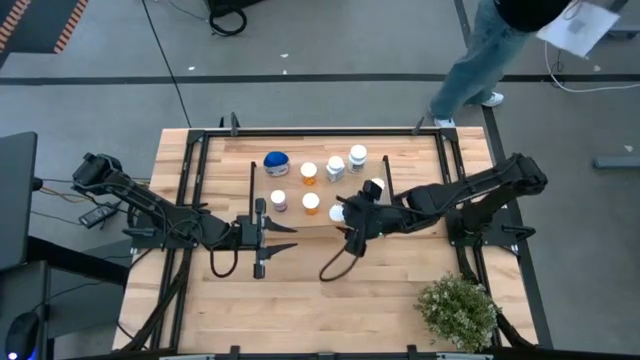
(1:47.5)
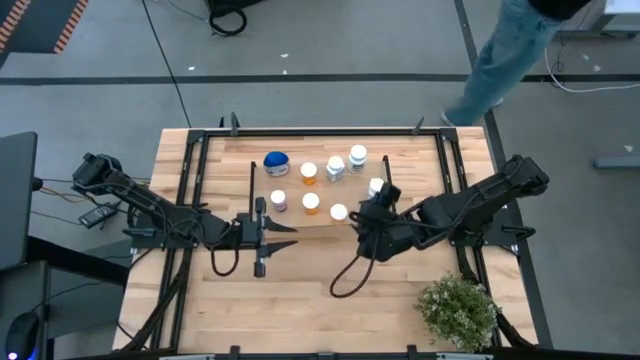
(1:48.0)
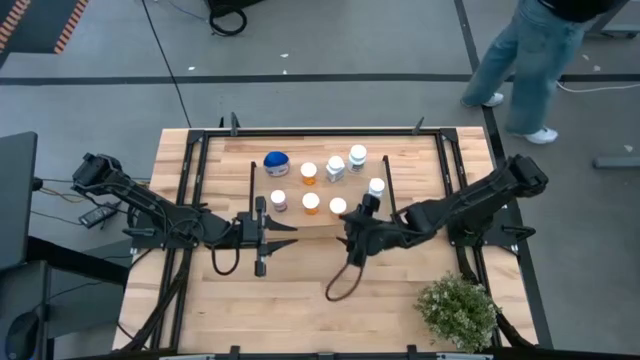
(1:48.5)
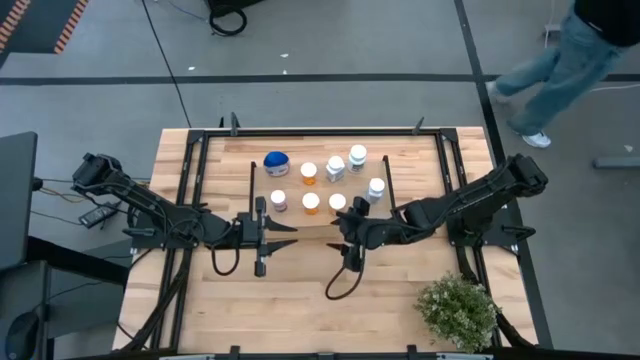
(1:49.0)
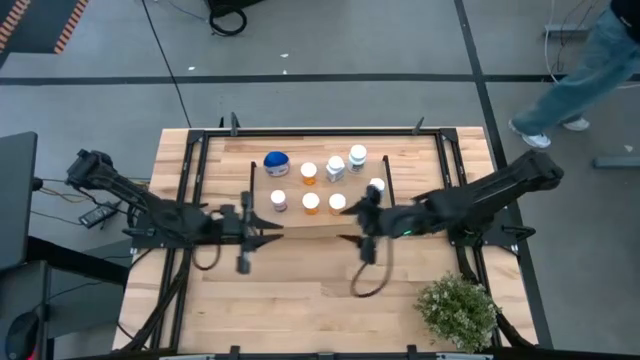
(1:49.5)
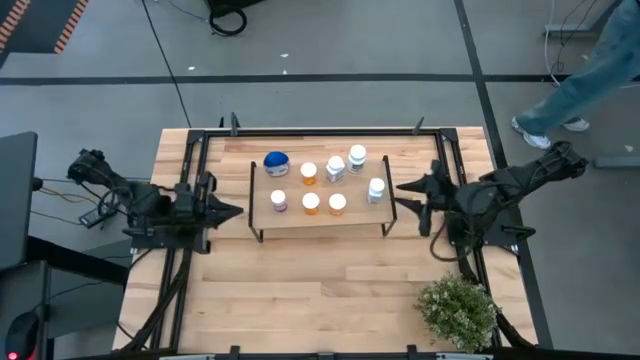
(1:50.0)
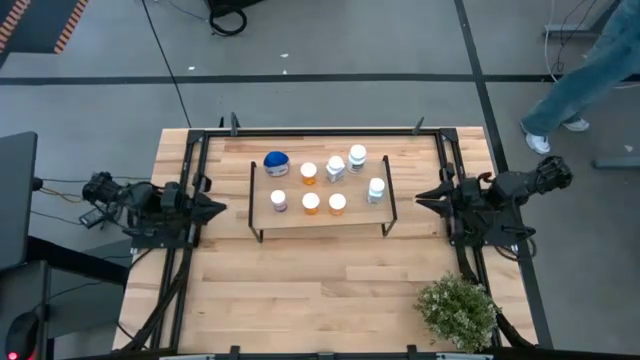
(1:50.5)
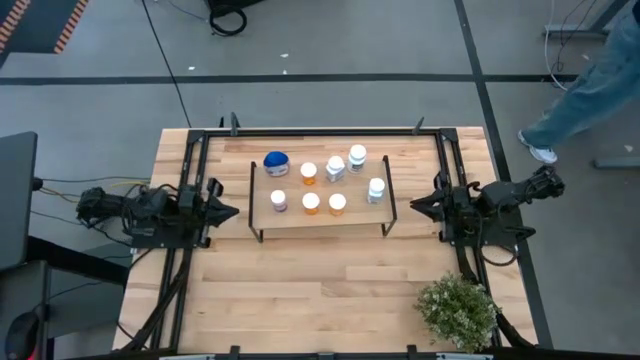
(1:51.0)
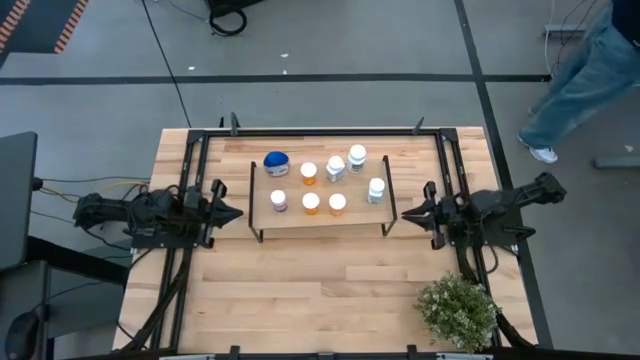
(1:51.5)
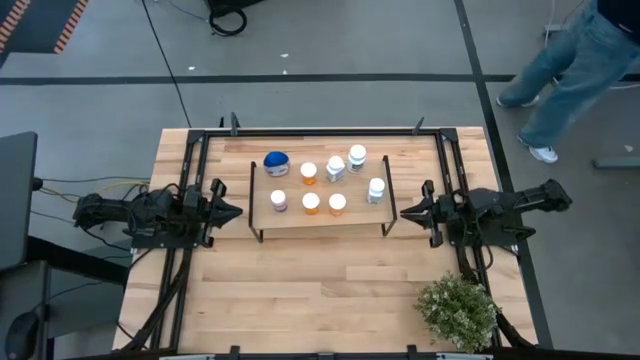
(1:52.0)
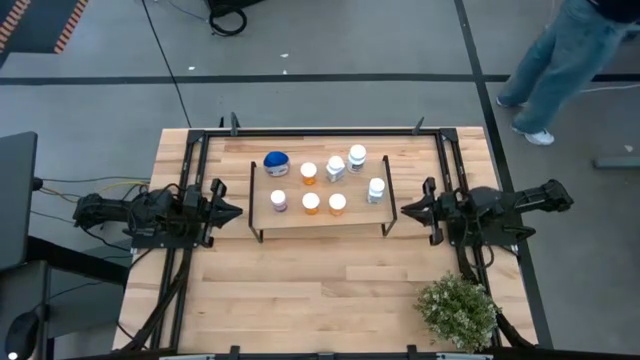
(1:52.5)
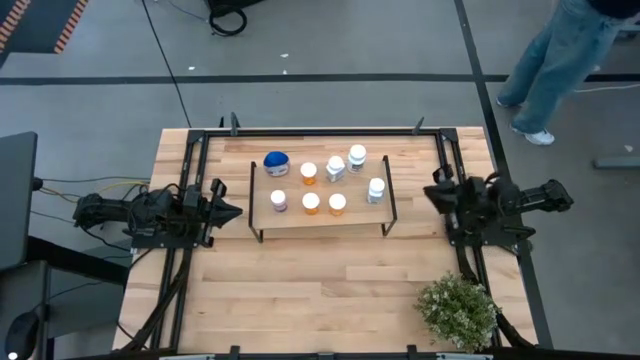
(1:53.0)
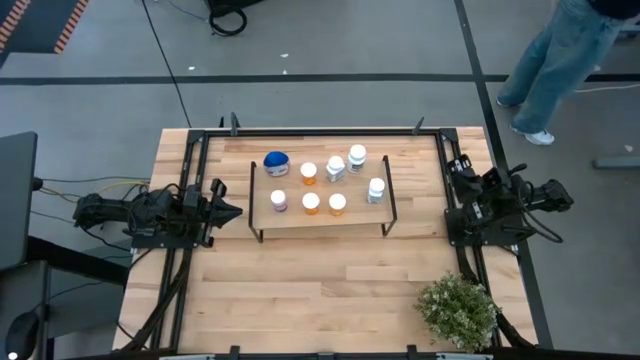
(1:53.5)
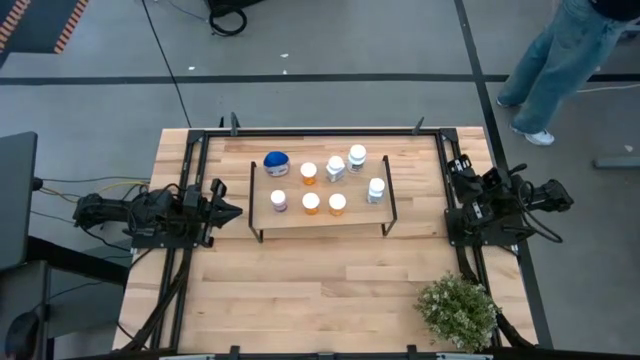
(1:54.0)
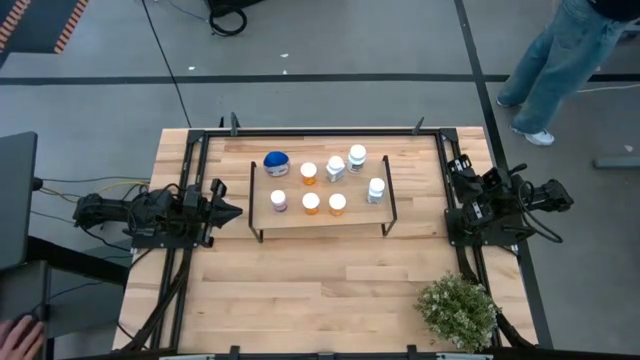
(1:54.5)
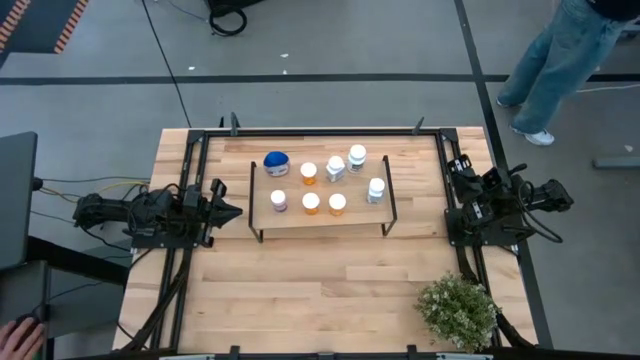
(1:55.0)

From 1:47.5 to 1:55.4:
Task: Pick and place medicine bottles onto shelf by color
Return to Home Position

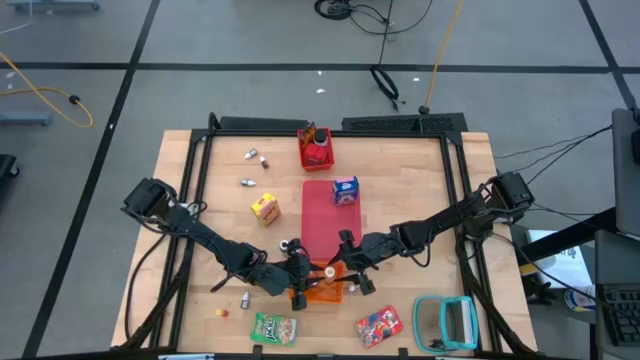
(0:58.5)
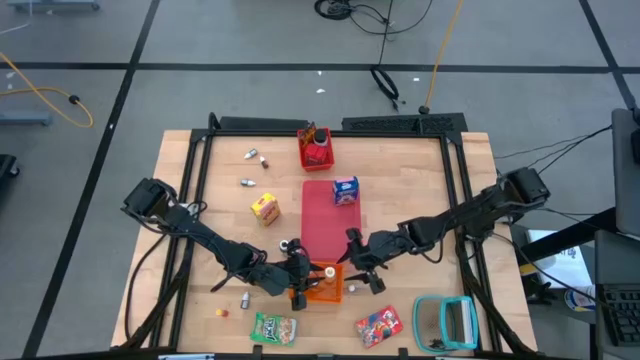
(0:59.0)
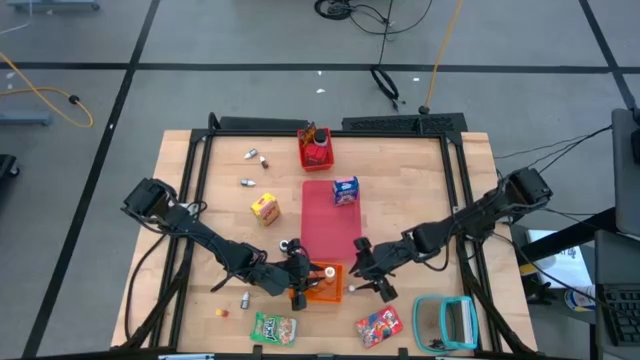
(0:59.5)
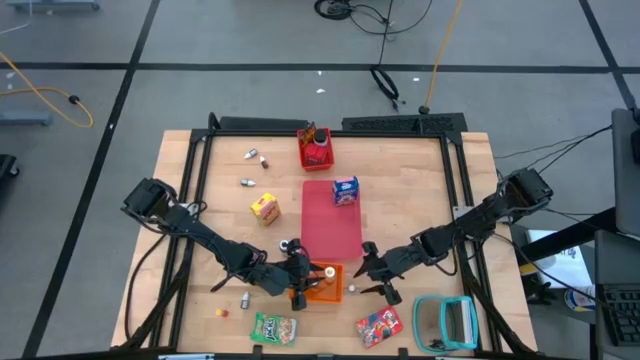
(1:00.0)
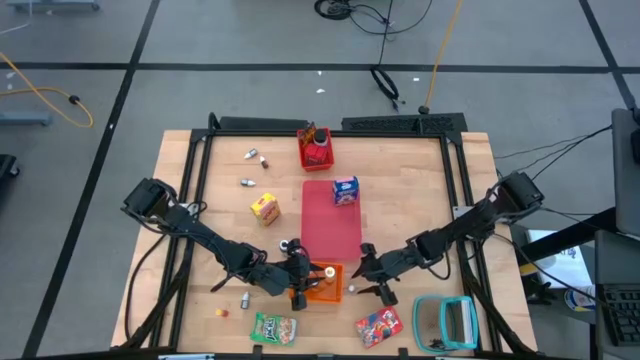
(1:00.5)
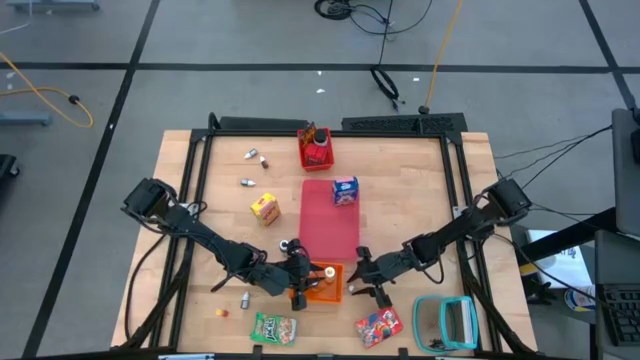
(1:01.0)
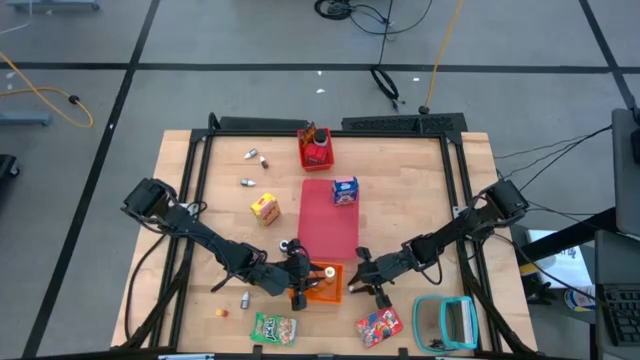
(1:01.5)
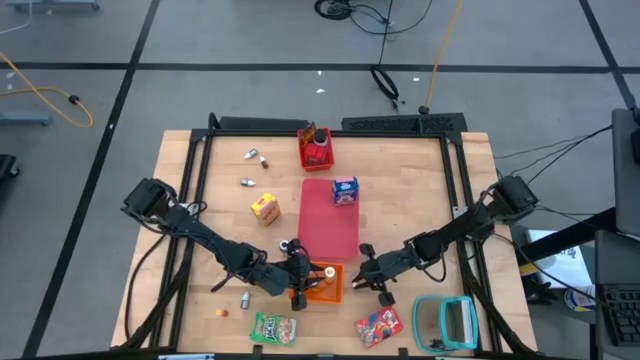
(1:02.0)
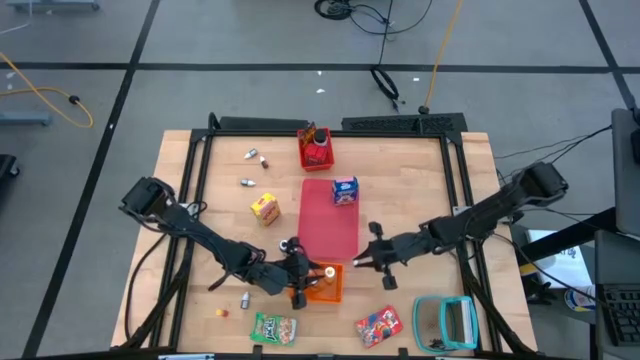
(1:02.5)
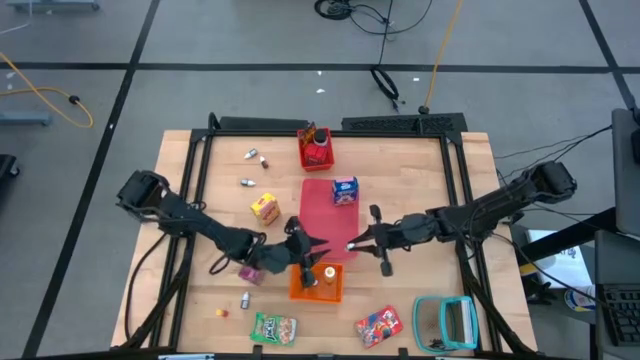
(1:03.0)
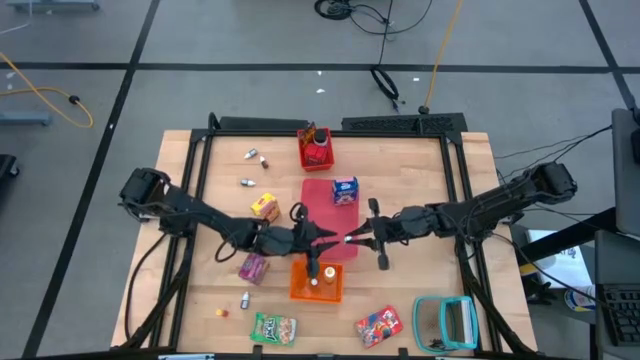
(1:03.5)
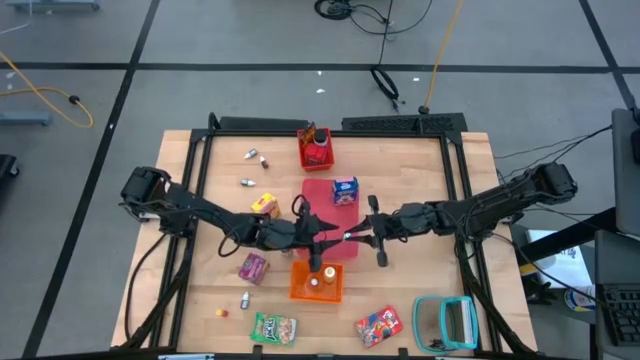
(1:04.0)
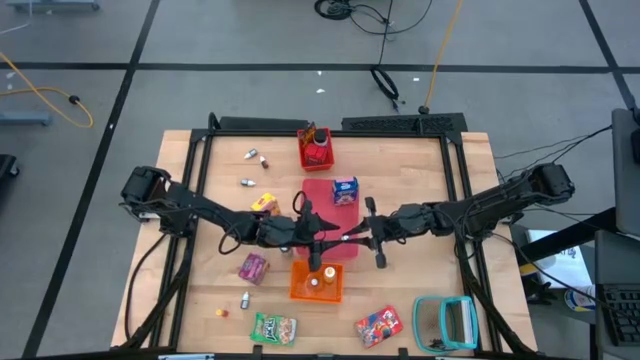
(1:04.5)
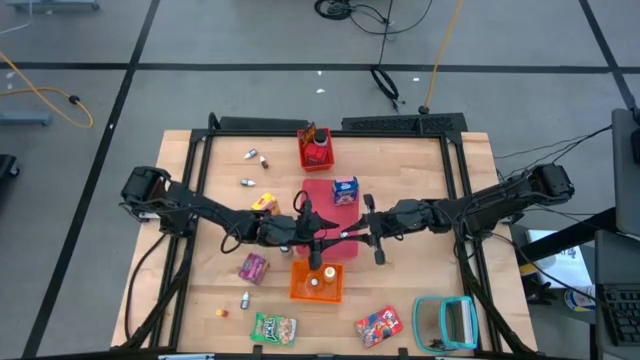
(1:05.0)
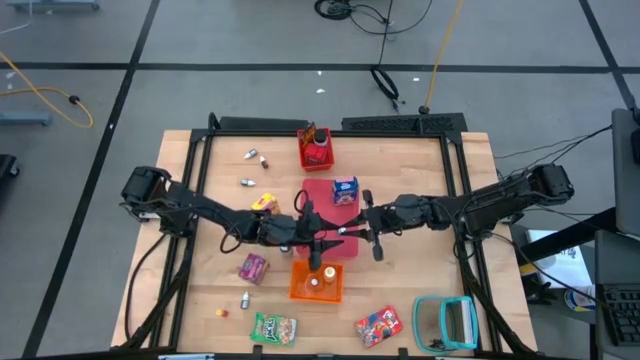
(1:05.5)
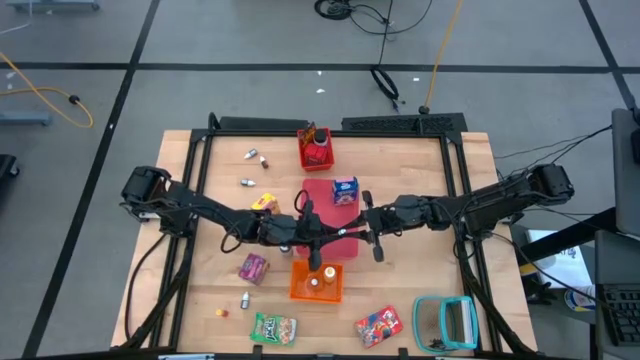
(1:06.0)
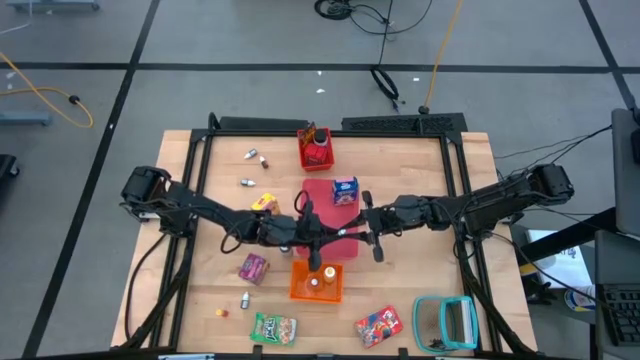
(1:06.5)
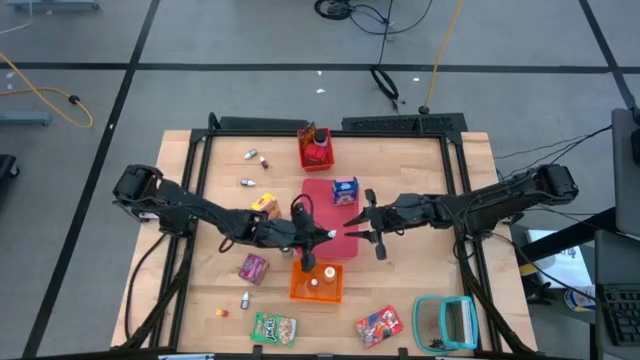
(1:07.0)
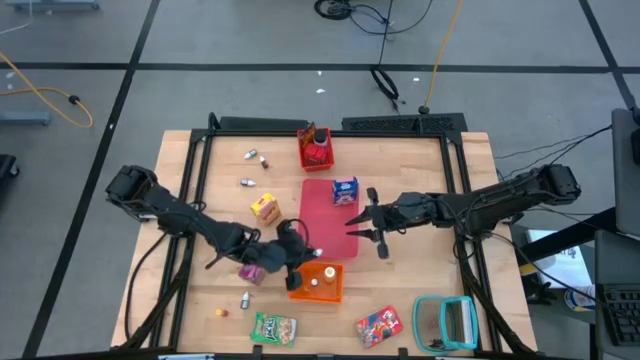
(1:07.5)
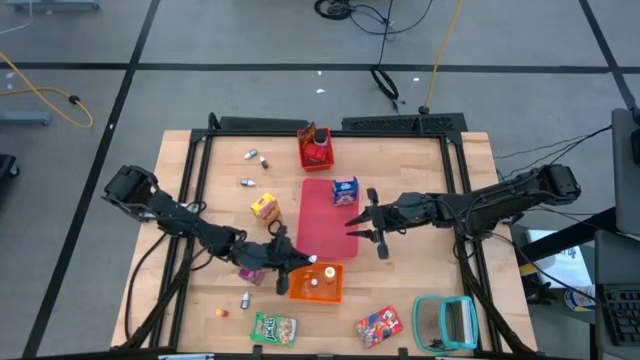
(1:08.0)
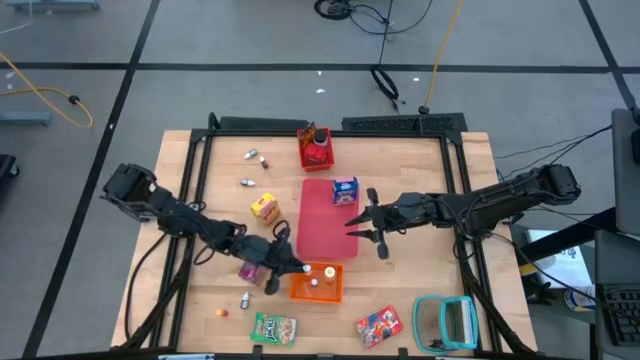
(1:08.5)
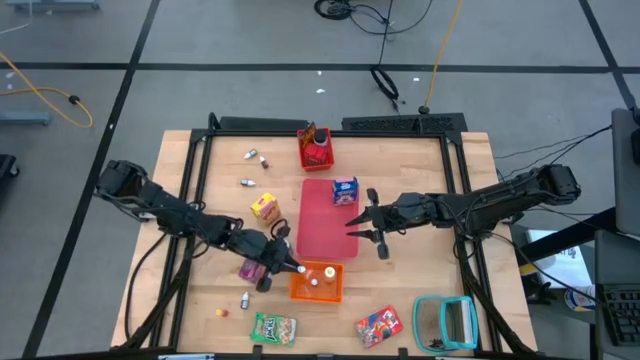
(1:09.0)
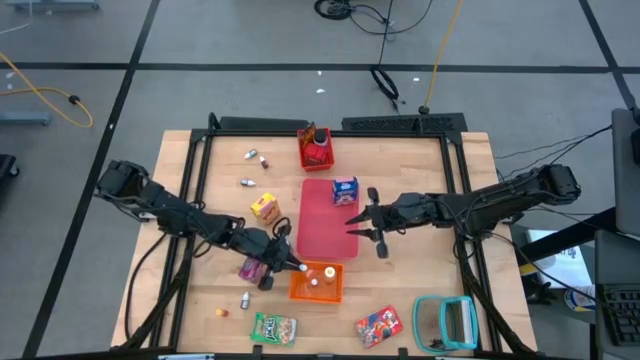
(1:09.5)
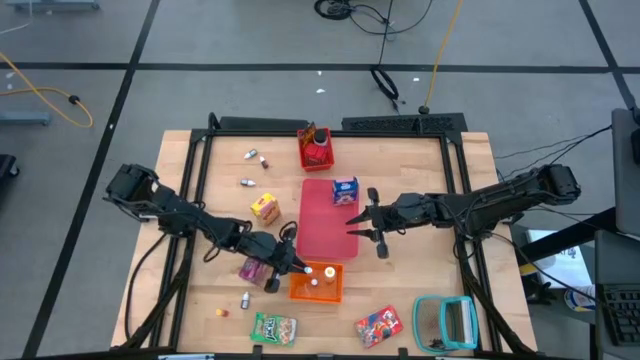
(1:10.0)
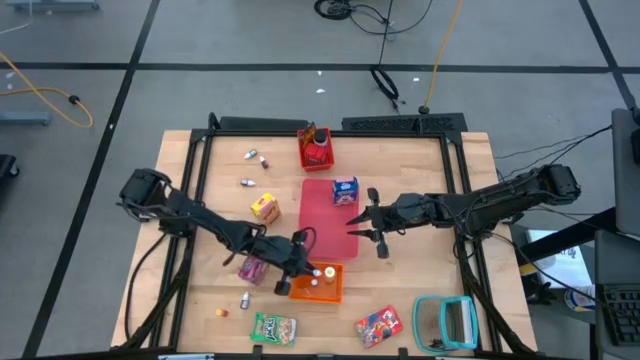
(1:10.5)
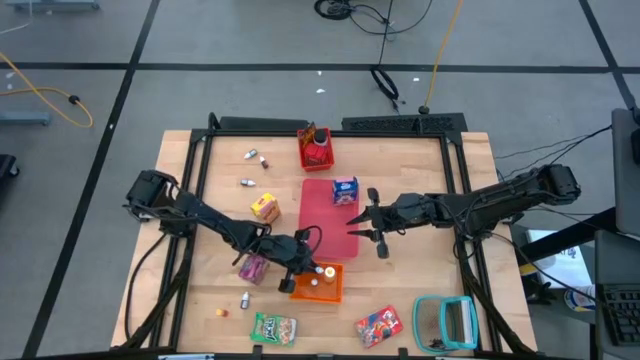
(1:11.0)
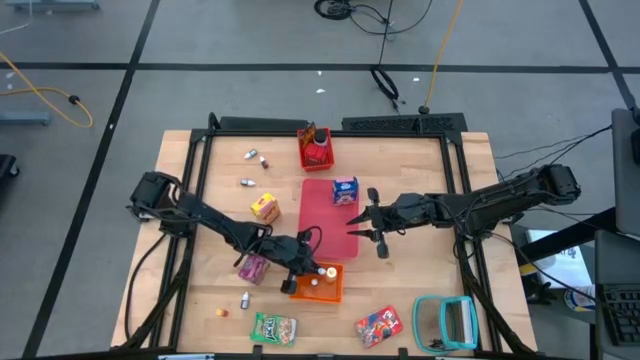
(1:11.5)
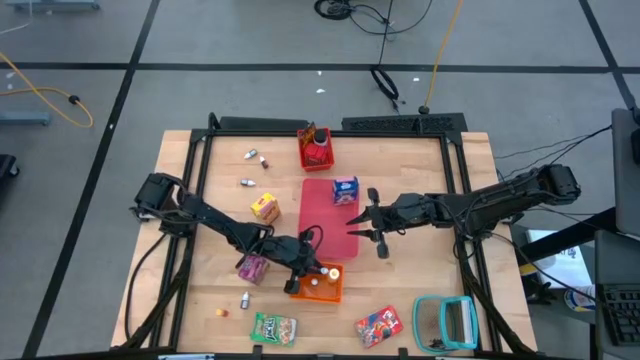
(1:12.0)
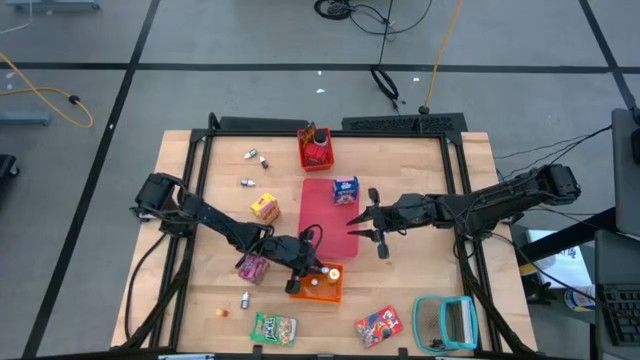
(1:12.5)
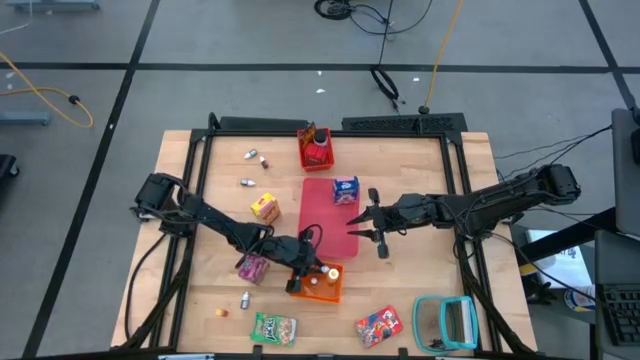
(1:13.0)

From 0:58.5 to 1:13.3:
Task: Pick & Place Kitchen Items
Put the small green food coloring bottle into the orange bin
